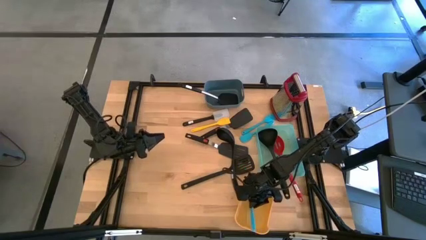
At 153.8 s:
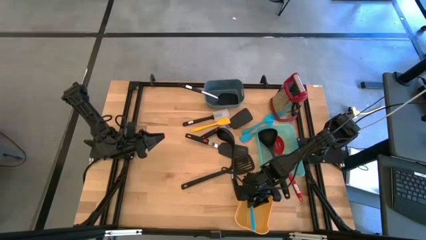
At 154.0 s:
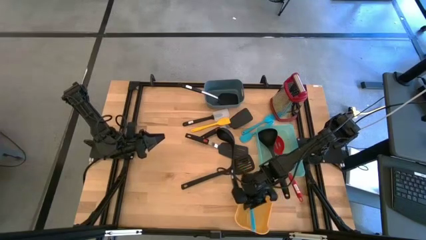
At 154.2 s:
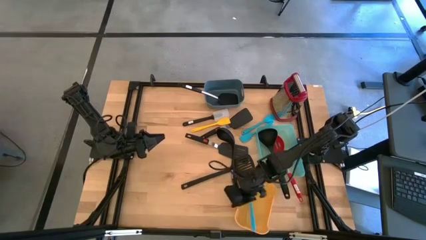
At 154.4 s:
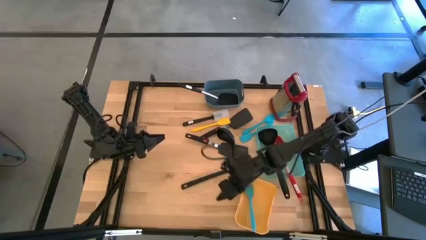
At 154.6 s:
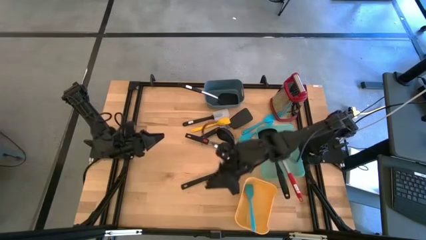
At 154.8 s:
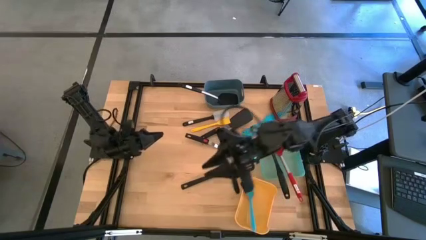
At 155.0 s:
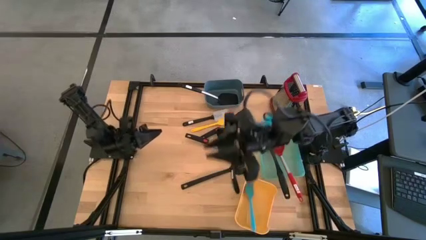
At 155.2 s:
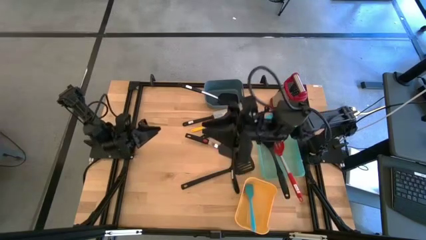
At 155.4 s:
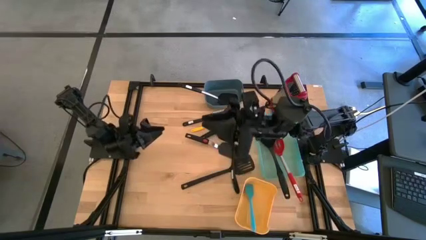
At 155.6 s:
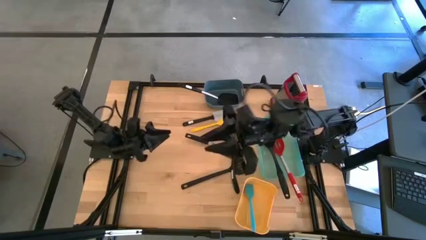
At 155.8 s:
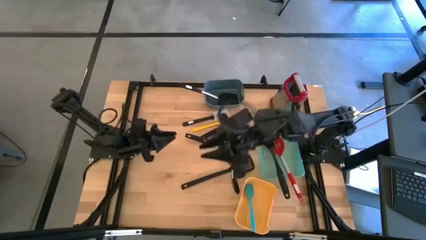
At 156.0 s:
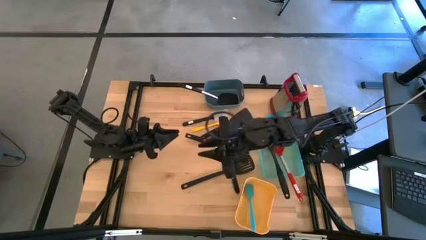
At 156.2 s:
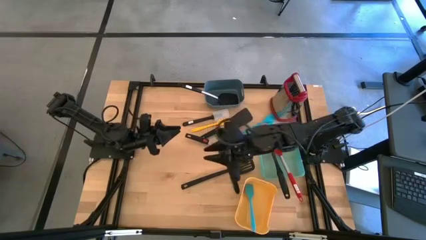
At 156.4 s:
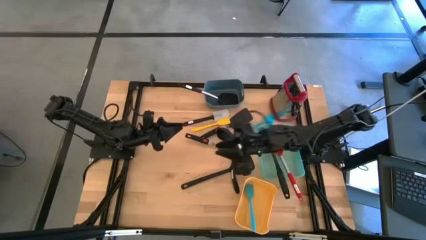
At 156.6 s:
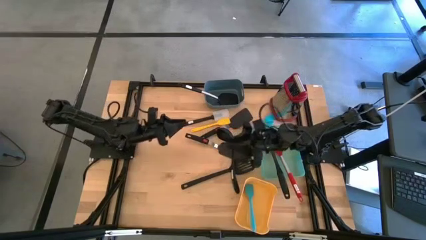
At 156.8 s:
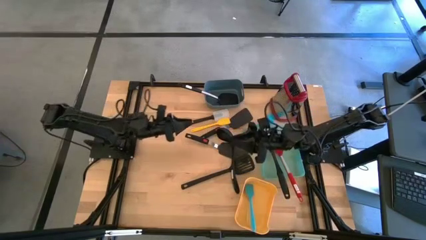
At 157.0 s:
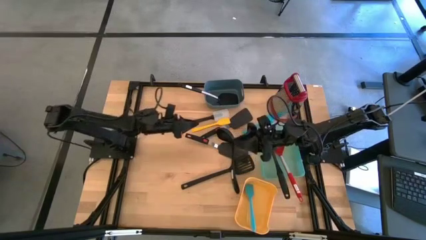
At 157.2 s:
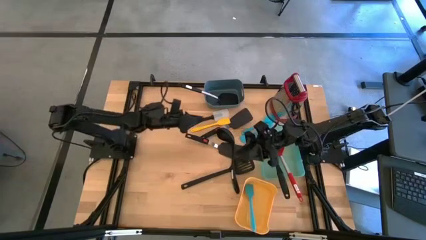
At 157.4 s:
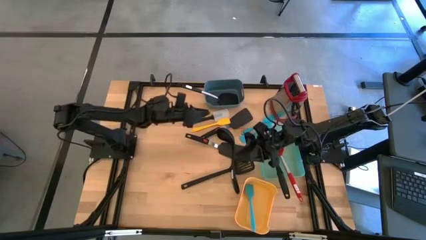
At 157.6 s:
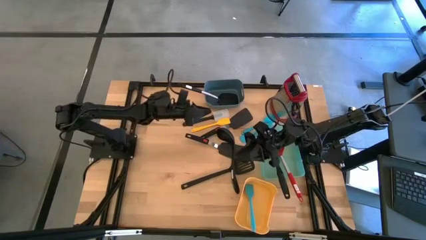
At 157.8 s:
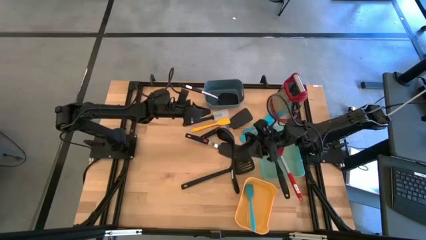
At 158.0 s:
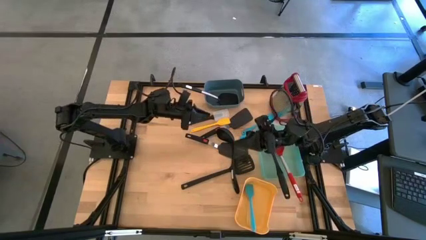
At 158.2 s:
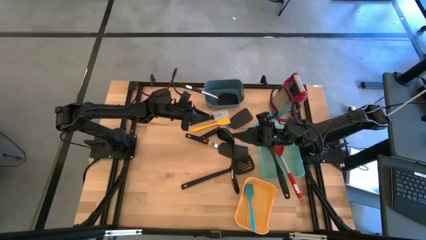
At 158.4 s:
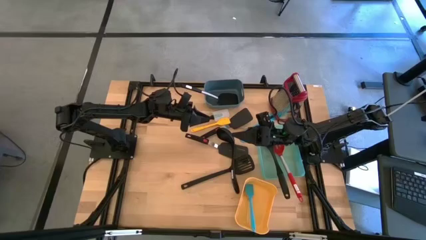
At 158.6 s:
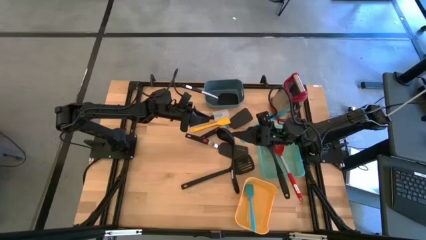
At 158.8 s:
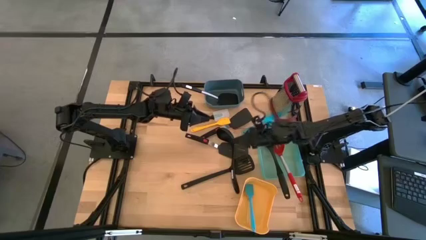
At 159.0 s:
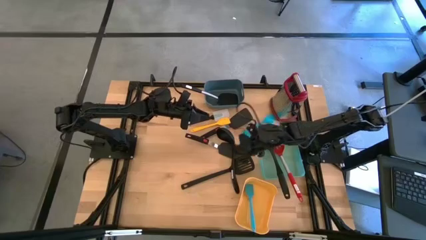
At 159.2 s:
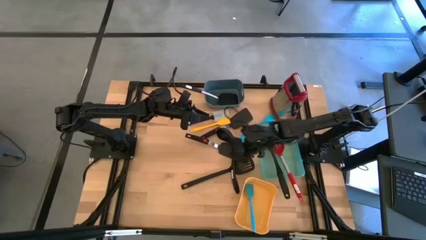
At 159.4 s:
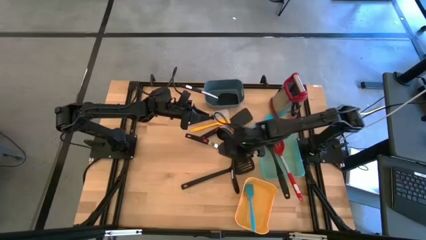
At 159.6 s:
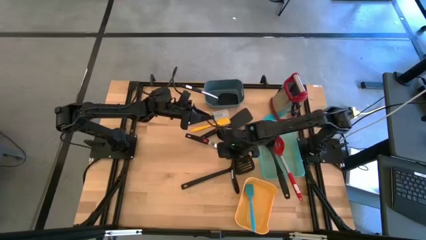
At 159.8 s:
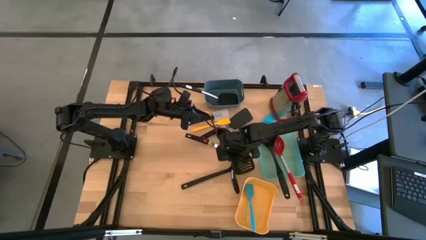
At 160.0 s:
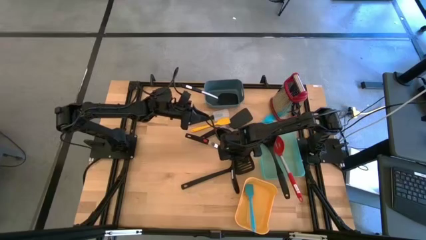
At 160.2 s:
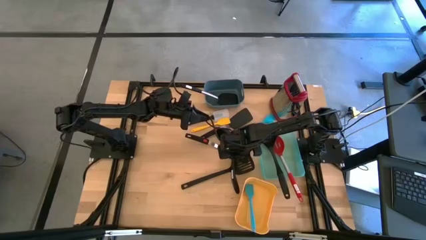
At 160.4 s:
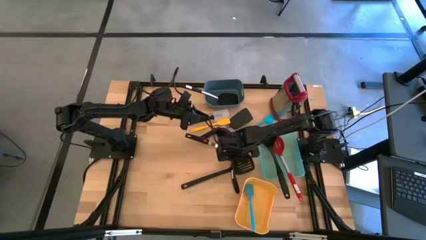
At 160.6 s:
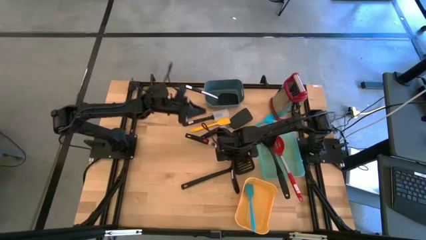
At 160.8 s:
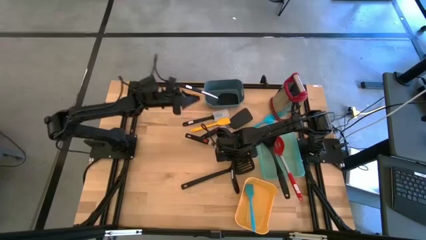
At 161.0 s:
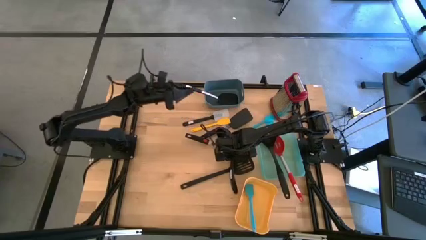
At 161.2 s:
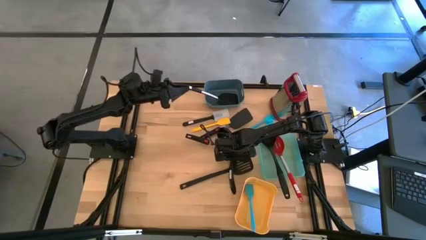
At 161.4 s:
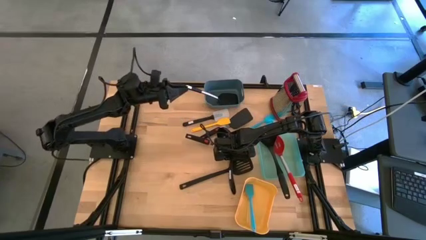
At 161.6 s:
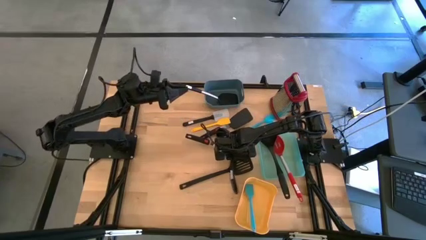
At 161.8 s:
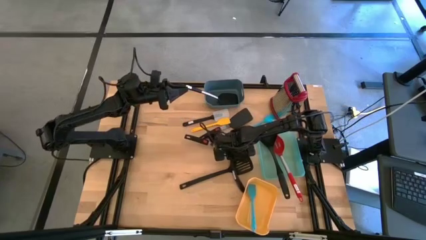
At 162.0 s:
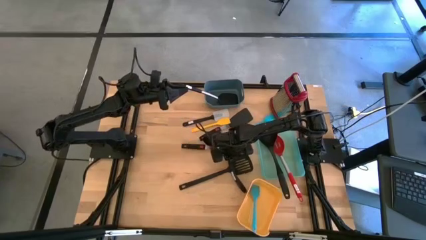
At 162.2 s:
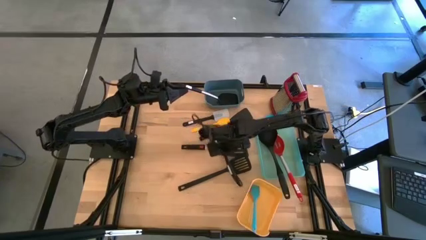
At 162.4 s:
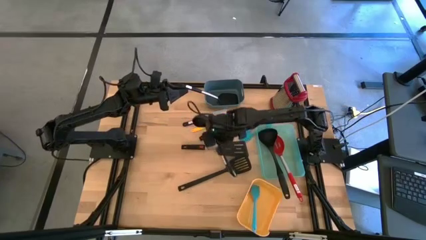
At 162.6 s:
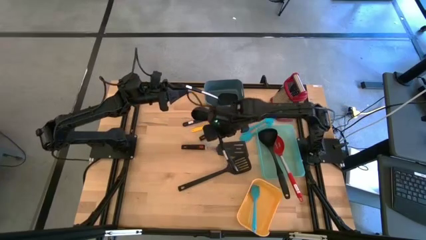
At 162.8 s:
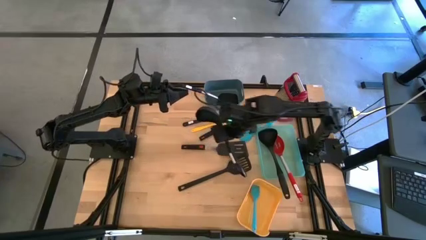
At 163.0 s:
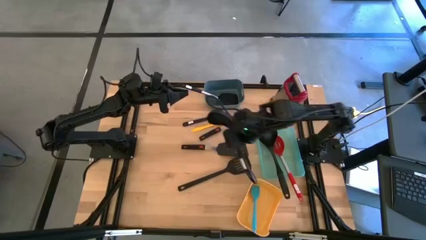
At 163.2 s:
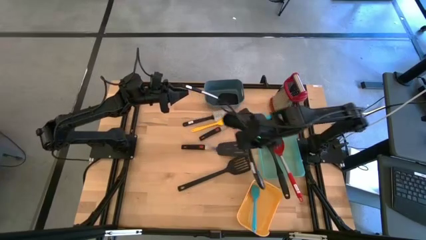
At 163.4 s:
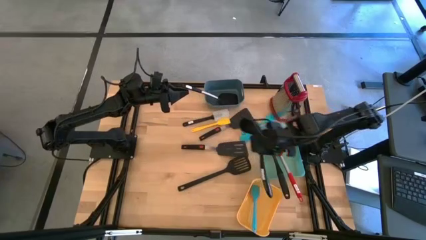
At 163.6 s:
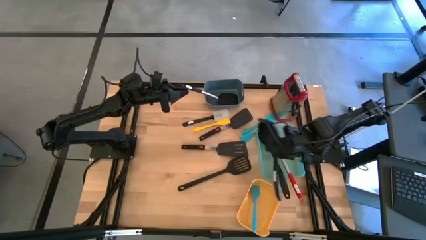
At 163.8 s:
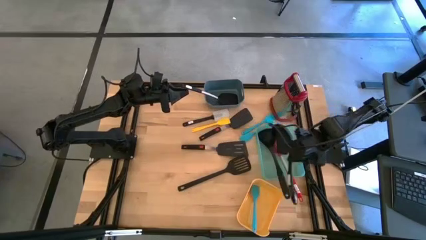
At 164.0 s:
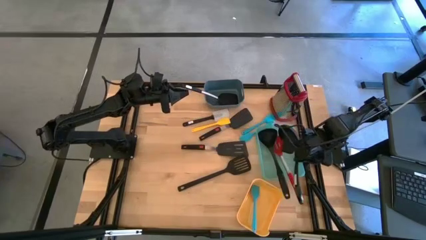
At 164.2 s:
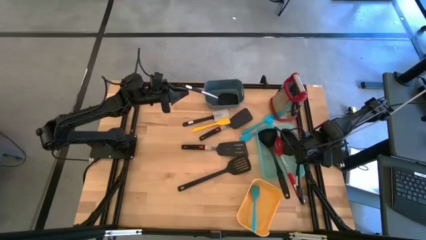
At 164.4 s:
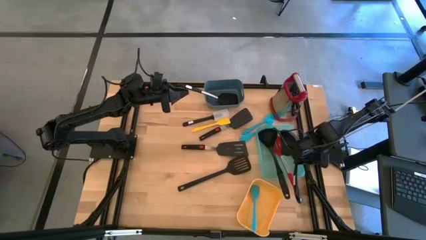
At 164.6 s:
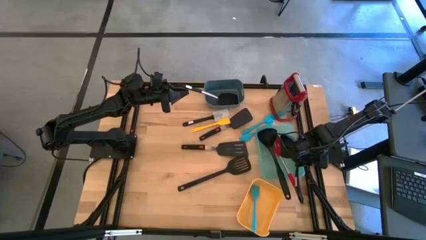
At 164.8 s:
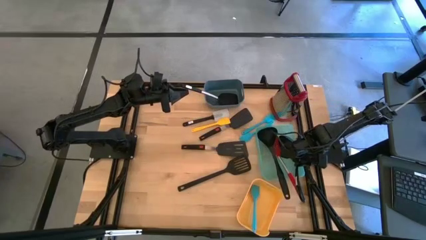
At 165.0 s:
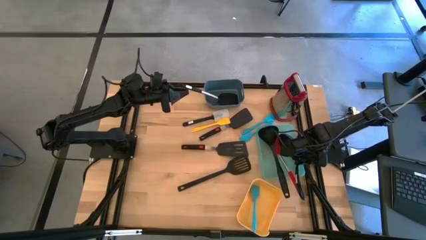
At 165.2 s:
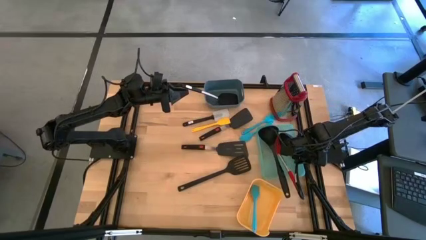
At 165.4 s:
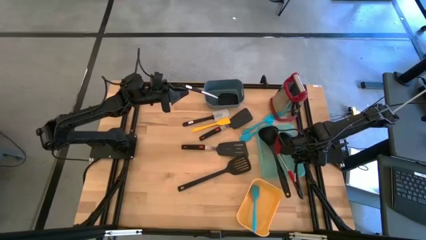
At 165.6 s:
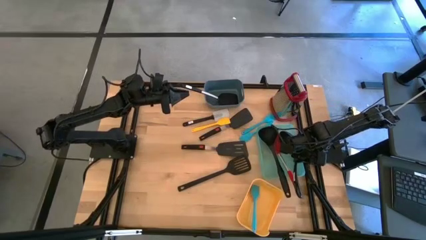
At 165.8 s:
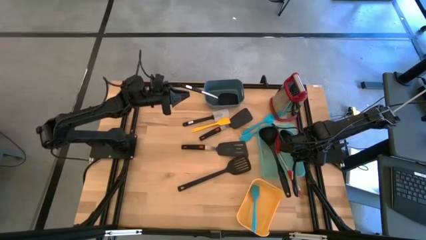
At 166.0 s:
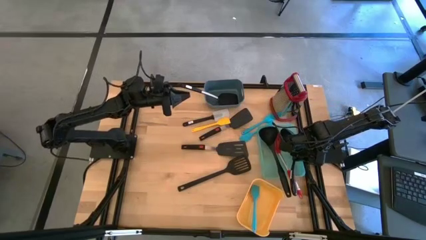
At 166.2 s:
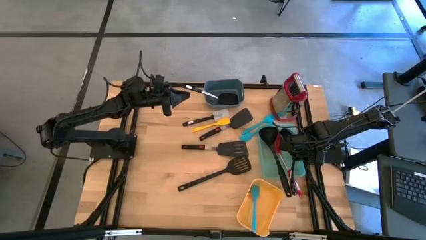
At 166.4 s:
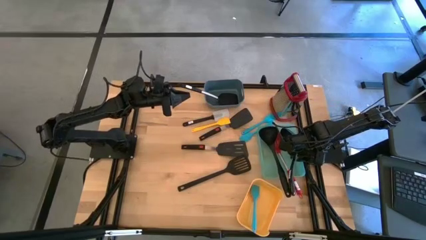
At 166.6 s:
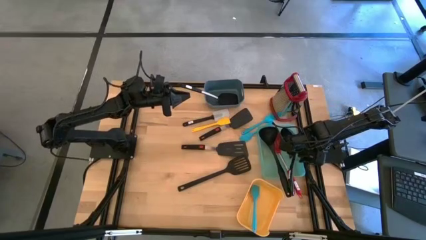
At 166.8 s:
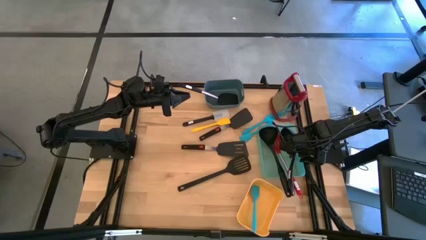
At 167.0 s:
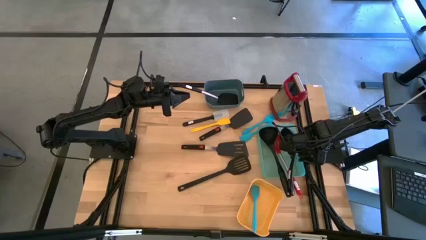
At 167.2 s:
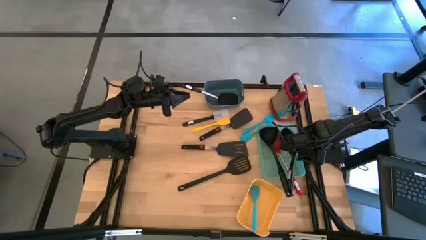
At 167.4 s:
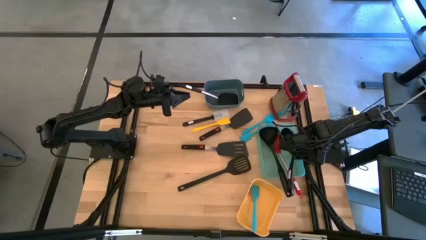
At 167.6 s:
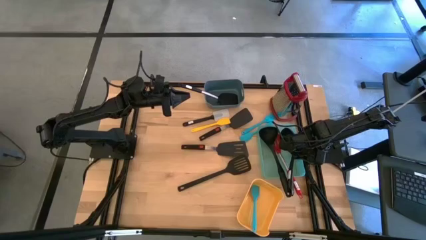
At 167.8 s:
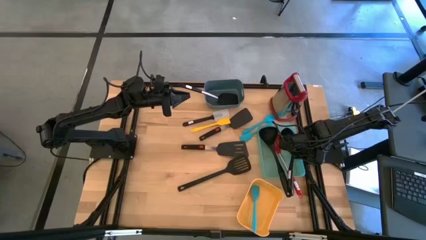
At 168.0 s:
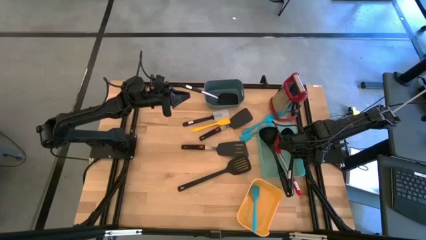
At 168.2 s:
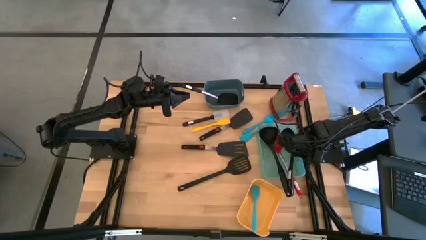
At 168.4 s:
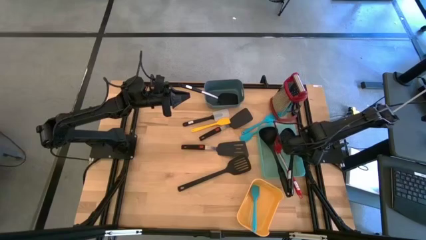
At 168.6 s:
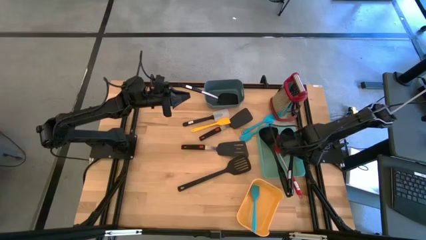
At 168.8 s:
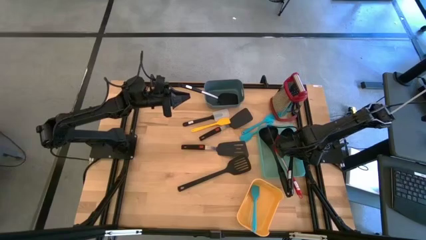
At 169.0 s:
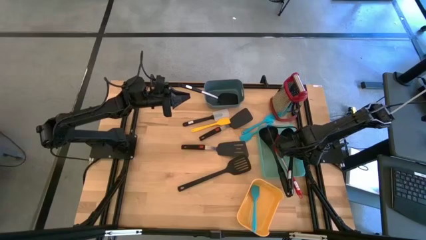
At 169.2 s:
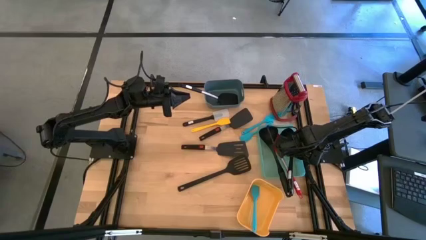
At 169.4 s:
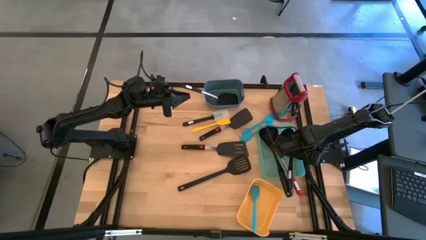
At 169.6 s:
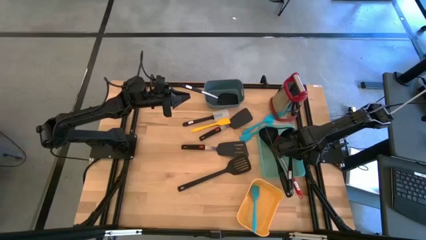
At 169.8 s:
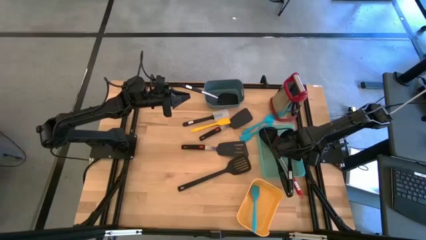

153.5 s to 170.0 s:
Task: Pick & Place Kitchen Items
Put the black serving spoon into the green bin
